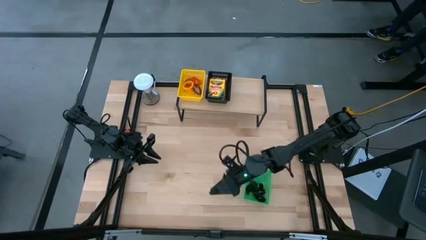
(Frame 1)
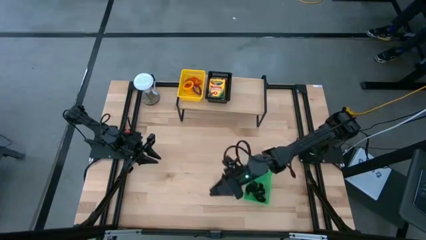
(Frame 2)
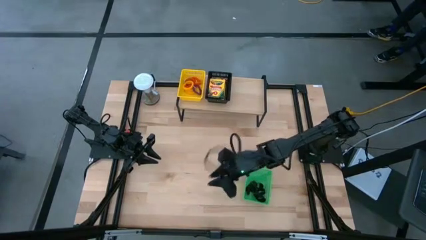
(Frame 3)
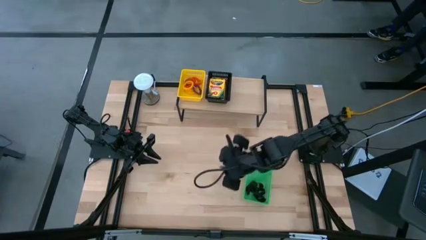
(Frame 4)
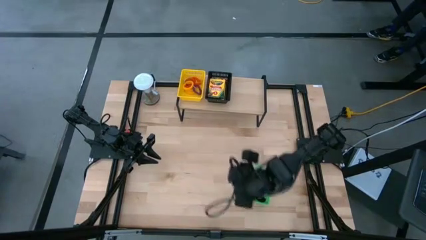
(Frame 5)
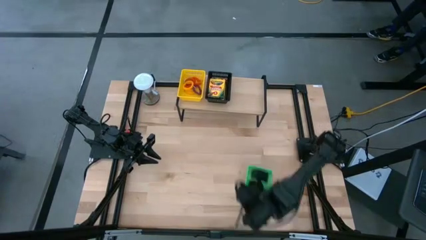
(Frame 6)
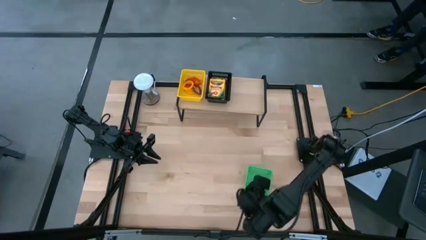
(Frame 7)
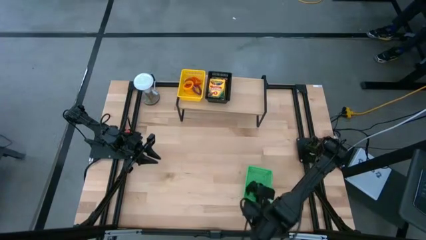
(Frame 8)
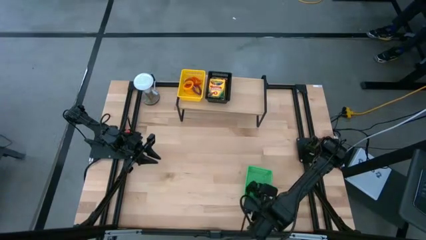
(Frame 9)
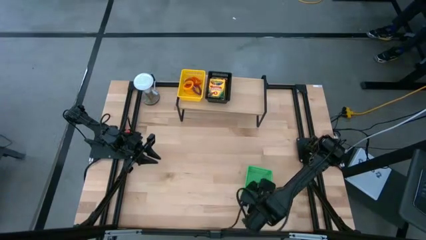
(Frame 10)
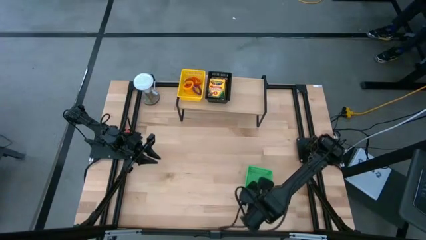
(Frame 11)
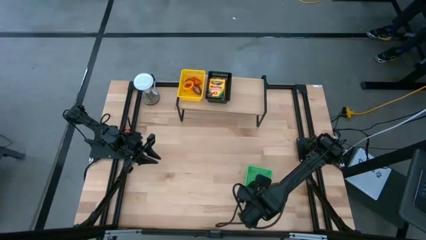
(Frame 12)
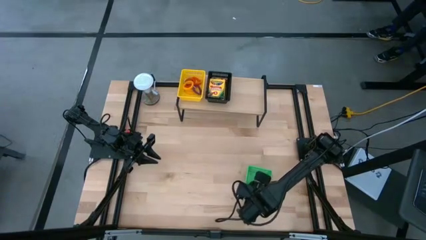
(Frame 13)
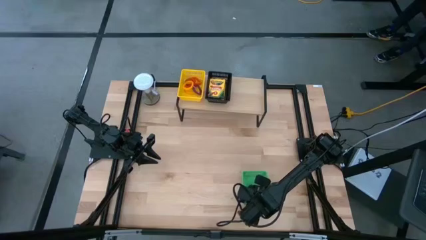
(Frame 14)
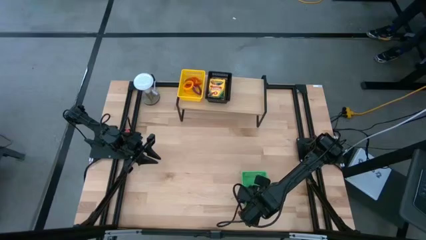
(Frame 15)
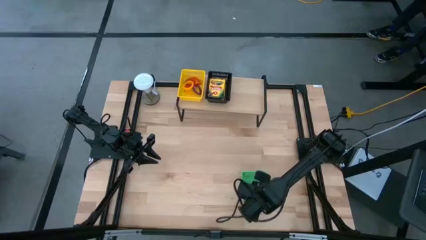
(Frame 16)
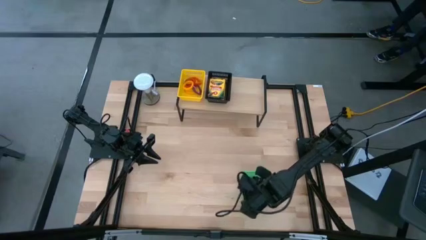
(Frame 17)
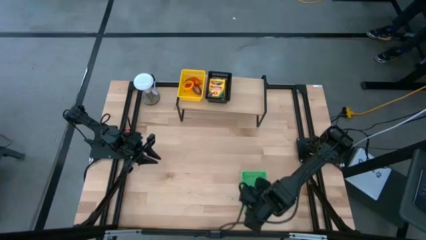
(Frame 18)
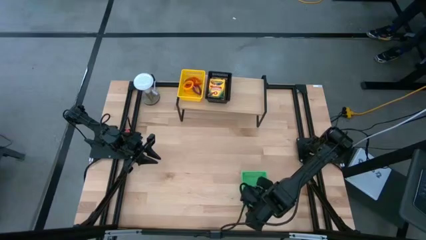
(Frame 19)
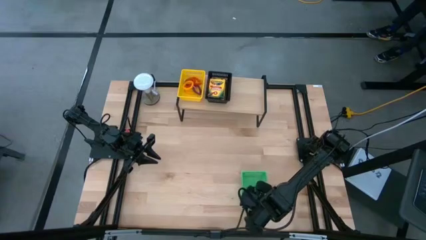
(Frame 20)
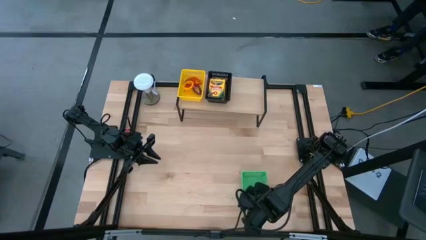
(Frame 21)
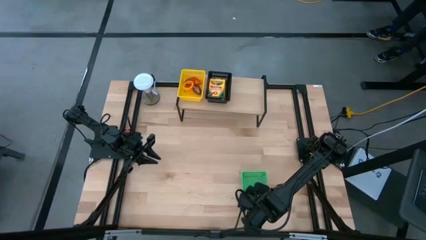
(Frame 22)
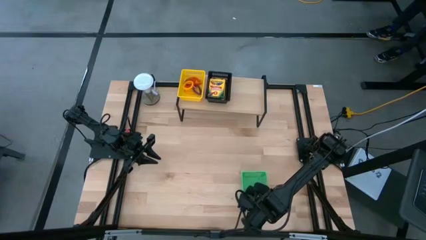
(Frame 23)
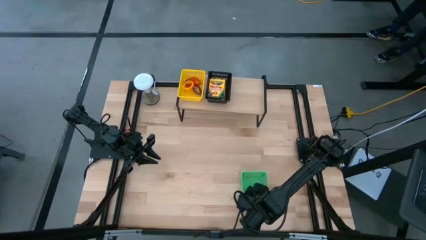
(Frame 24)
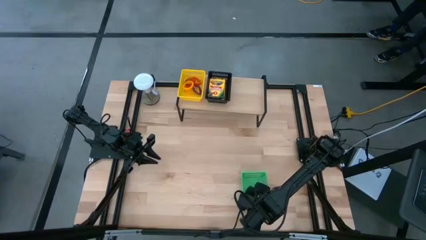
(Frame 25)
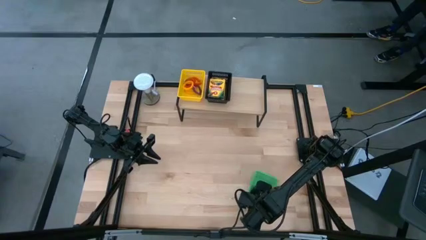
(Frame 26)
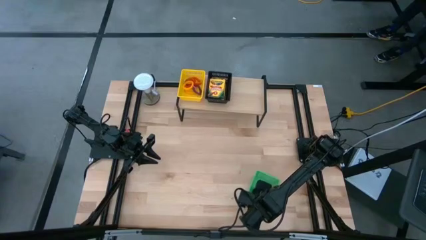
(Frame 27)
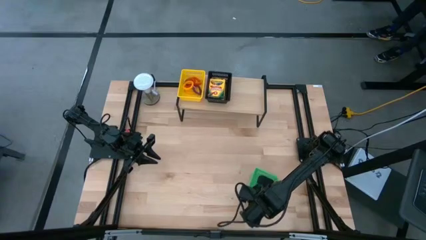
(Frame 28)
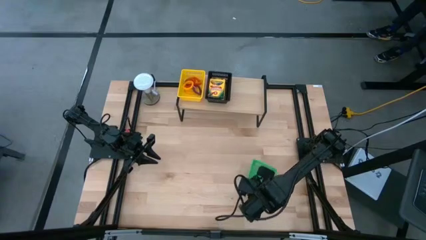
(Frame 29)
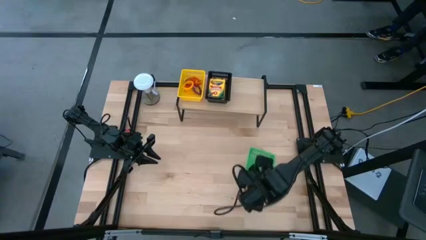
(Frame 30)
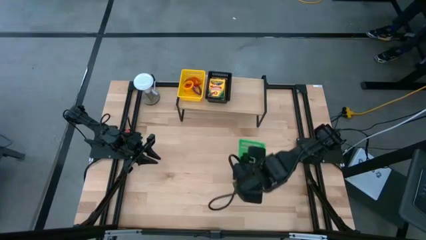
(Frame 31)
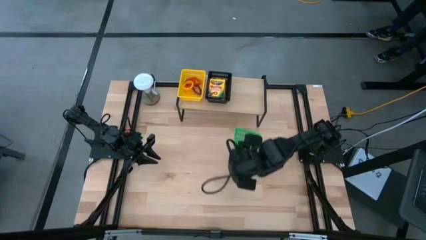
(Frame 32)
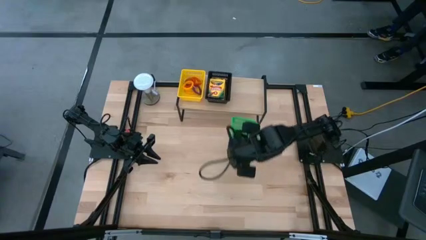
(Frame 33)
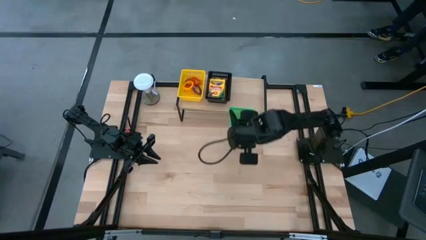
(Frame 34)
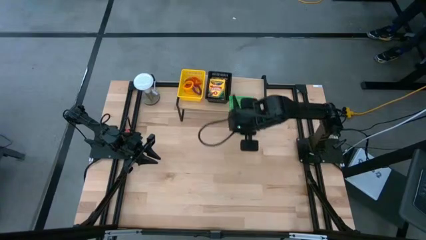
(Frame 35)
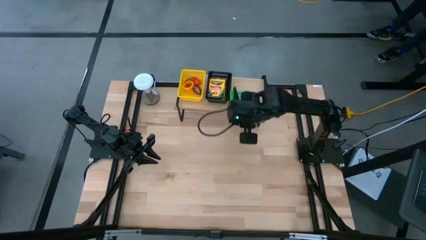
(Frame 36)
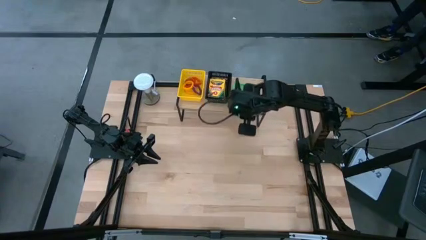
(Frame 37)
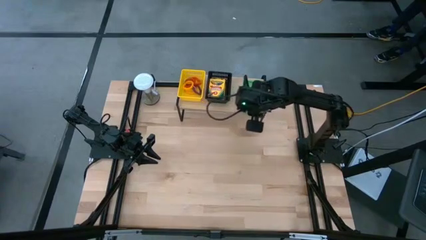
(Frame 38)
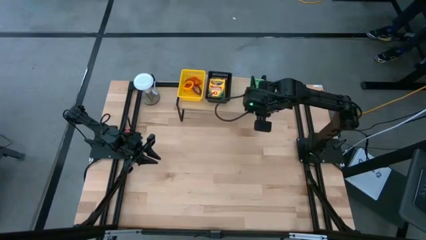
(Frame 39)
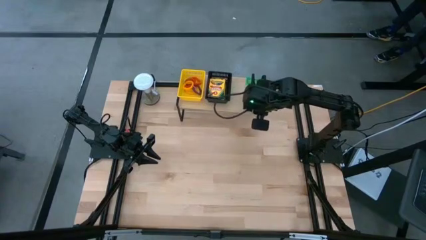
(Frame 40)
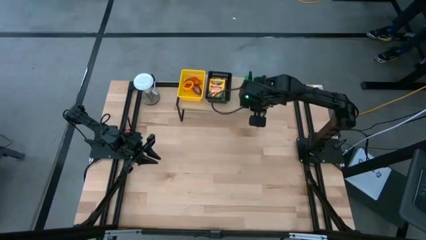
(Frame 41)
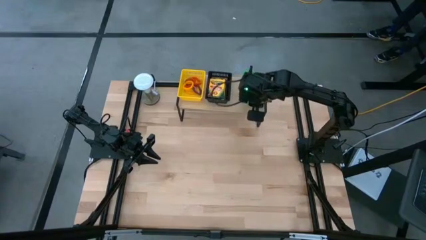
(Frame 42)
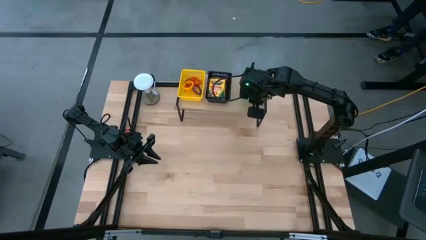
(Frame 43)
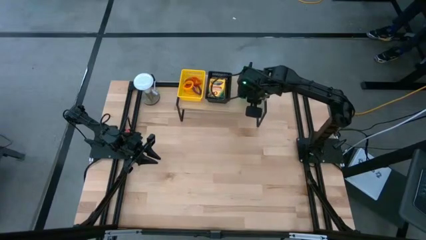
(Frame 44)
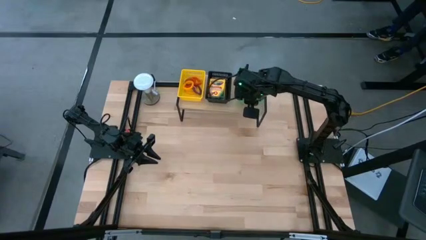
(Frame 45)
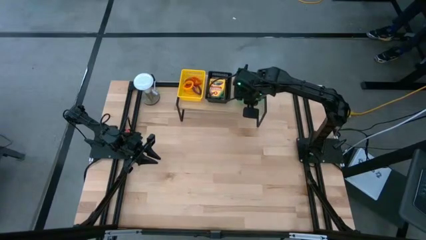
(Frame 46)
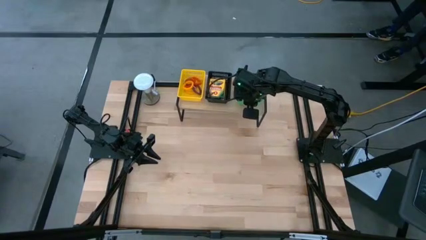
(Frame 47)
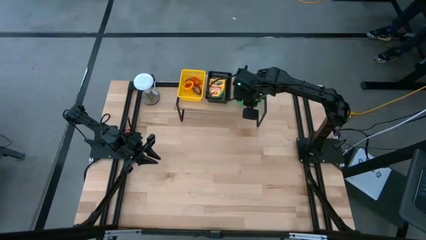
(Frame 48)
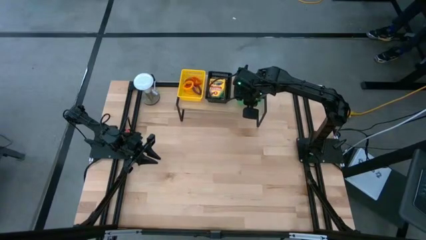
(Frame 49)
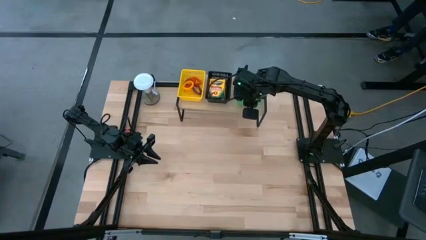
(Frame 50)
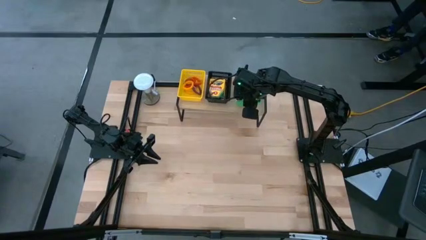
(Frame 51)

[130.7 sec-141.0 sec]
Task: Pick & Place Office Desk Supplies
Put the green bin with rubber bands on the shelf

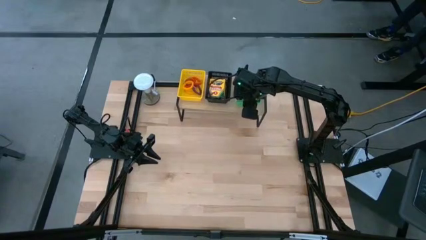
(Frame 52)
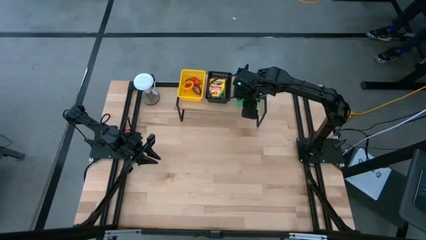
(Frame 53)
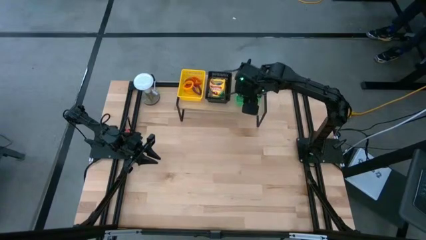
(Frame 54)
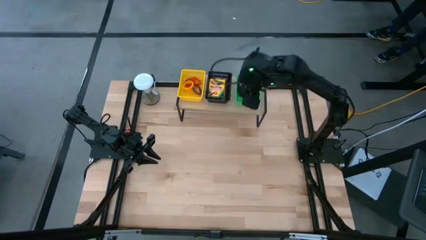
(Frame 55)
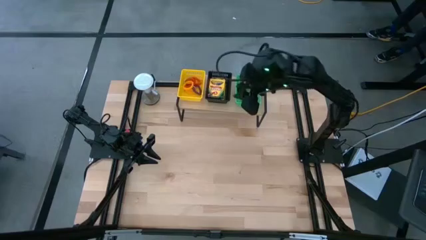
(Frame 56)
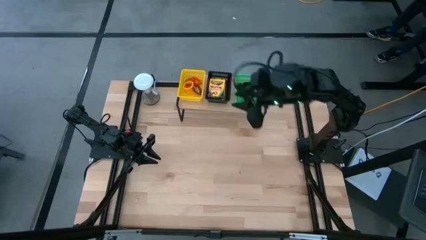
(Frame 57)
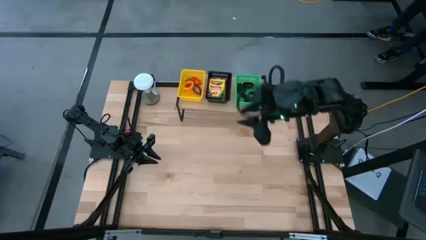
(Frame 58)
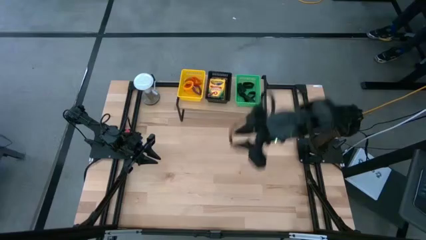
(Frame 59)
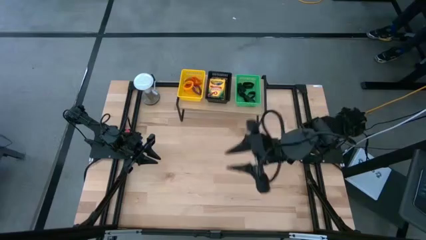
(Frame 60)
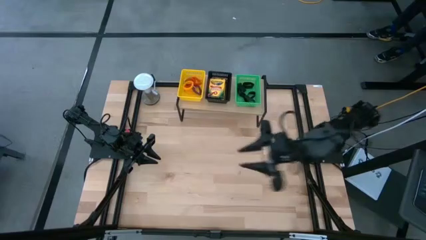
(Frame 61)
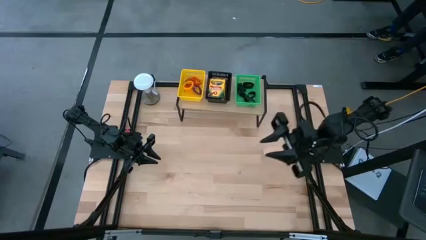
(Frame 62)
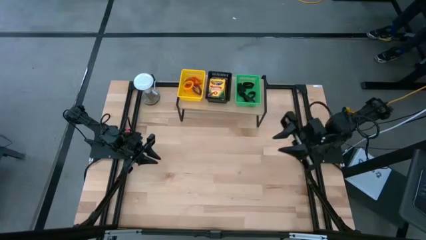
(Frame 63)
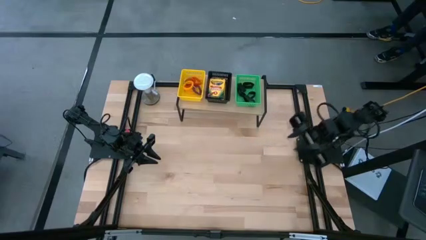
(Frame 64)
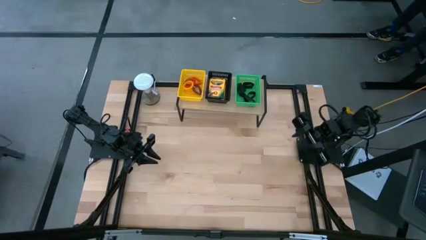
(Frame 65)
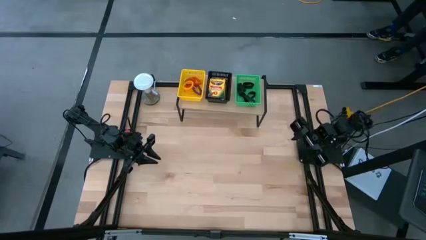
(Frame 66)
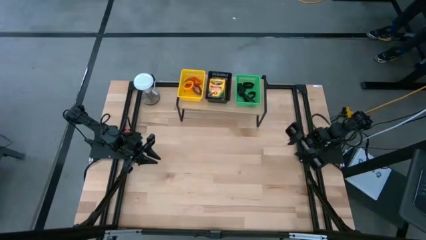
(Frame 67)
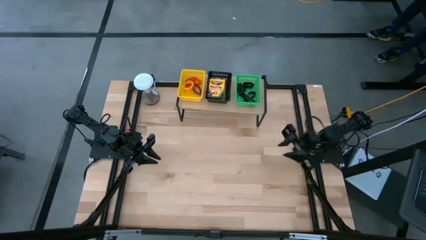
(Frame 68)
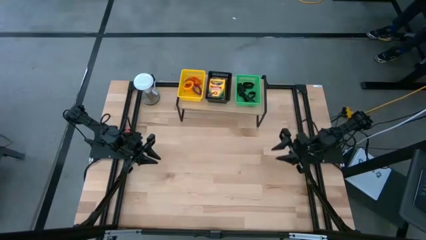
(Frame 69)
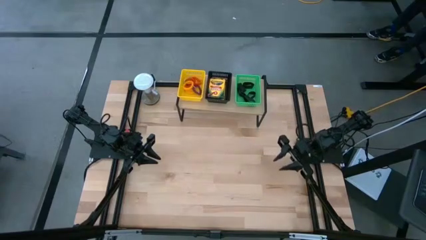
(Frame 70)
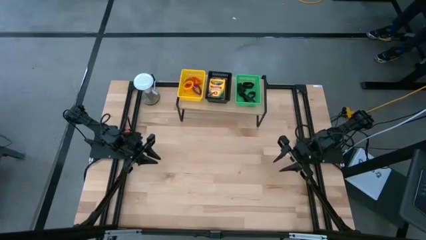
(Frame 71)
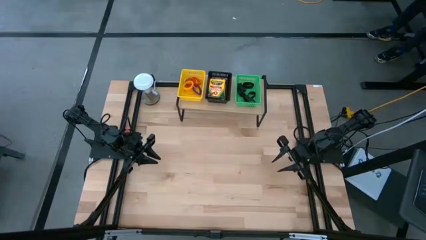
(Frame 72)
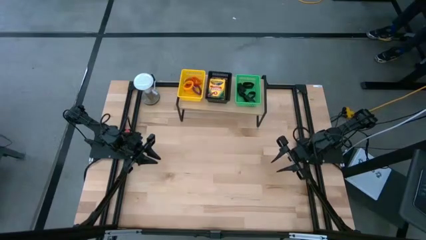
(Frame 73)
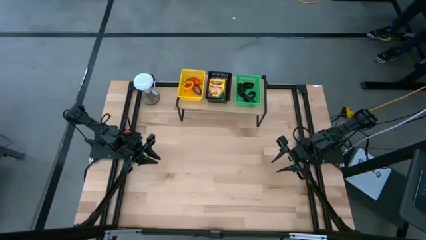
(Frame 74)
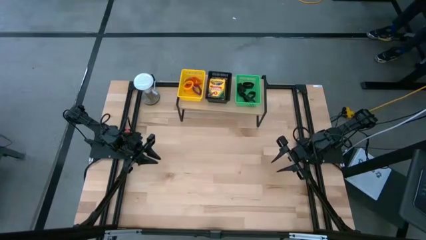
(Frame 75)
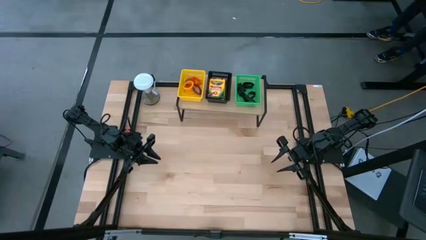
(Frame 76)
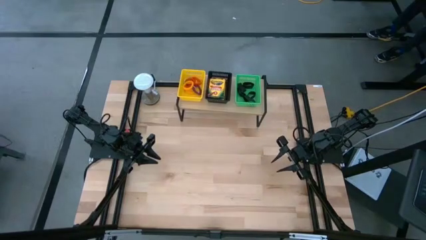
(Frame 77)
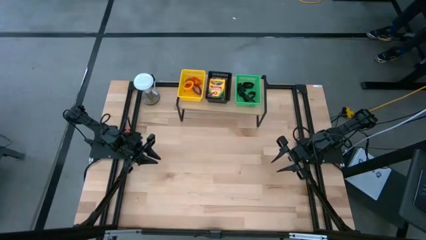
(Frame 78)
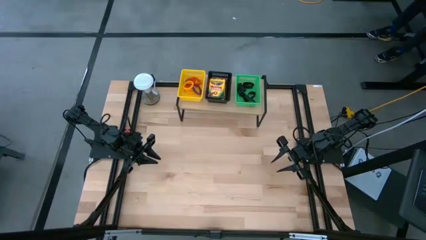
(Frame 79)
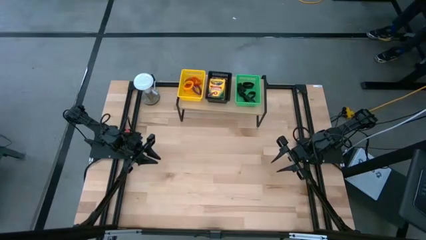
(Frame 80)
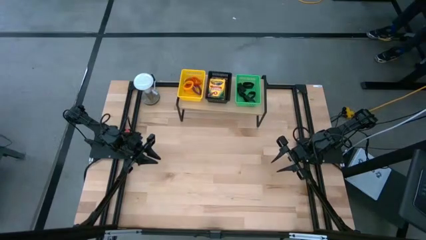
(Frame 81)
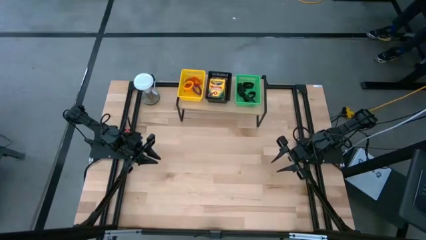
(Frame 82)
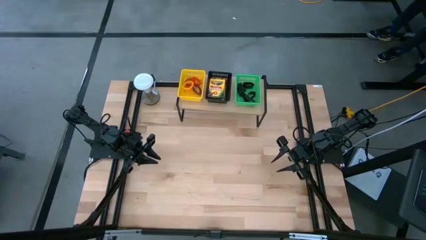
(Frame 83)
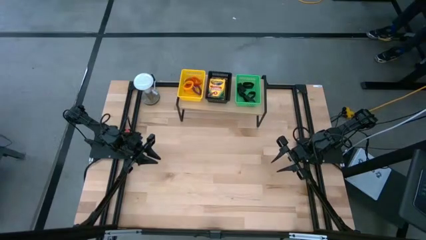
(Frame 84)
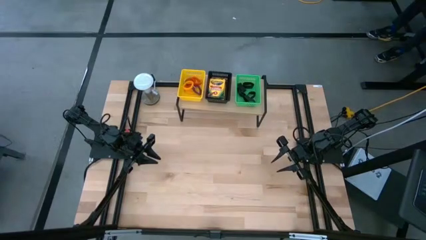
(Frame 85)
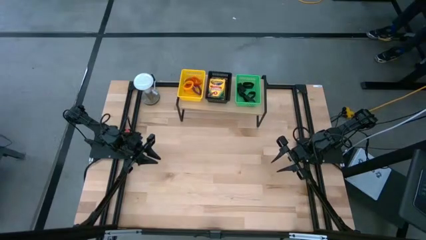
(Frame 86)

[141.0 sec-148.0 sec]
Return to Home Position
